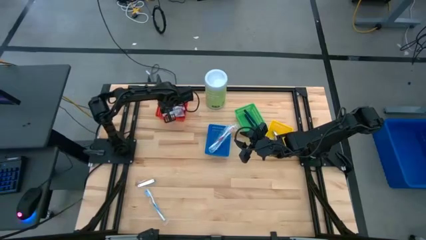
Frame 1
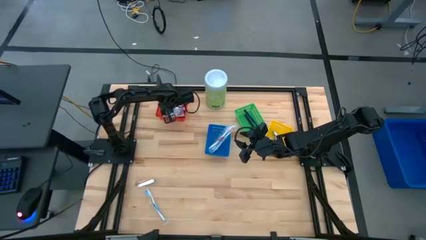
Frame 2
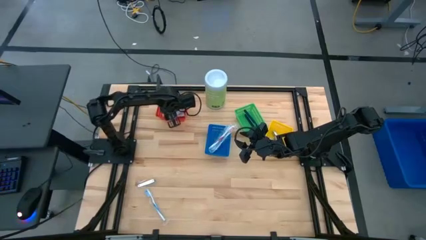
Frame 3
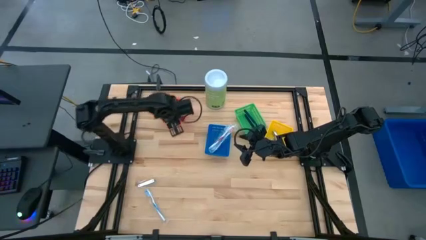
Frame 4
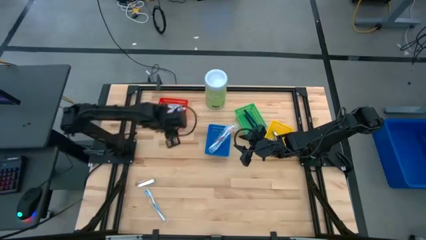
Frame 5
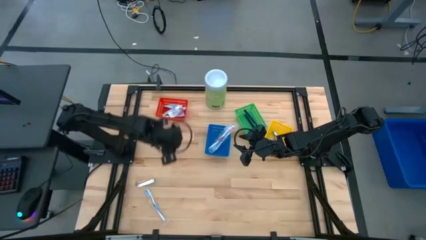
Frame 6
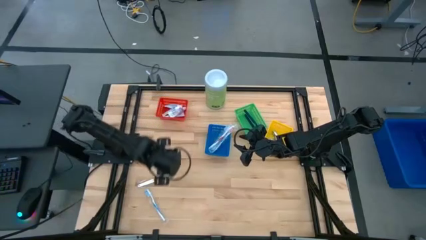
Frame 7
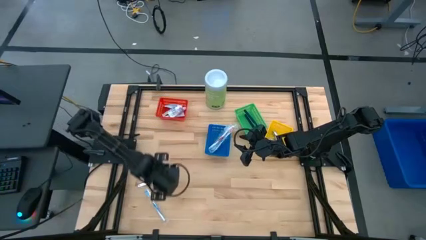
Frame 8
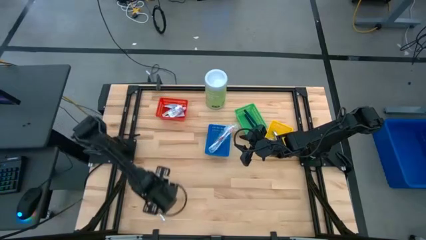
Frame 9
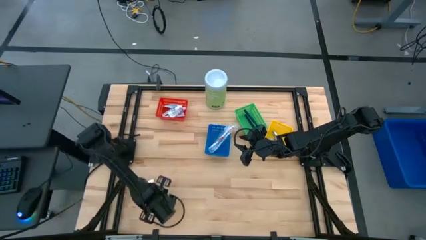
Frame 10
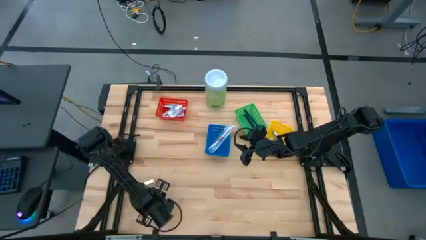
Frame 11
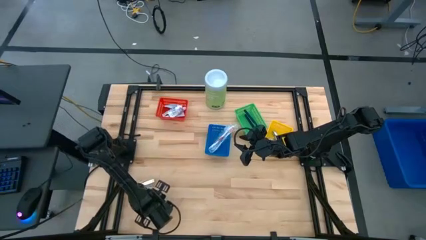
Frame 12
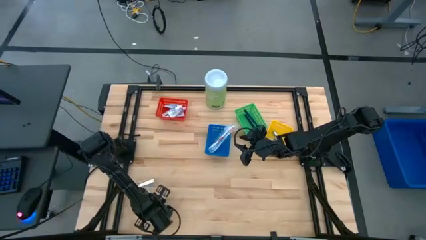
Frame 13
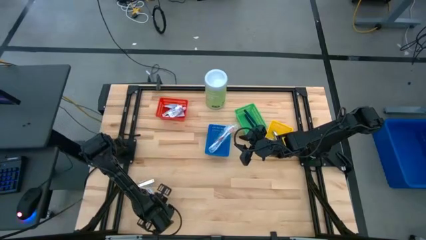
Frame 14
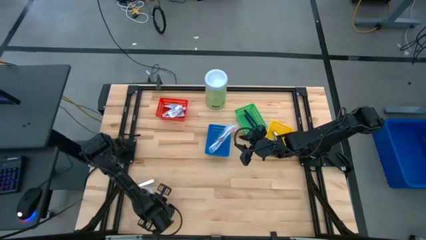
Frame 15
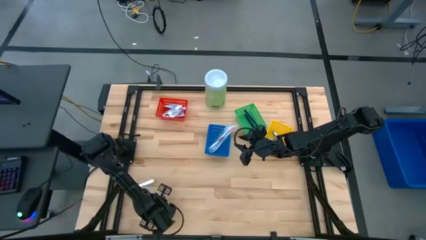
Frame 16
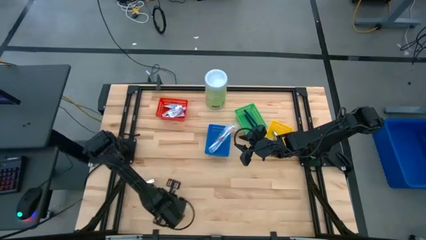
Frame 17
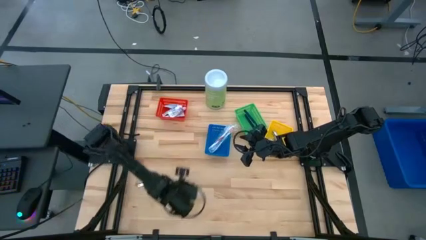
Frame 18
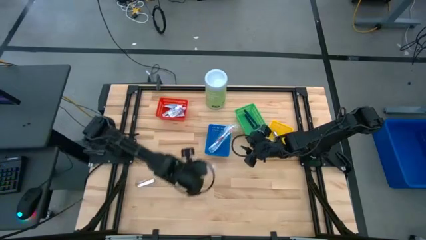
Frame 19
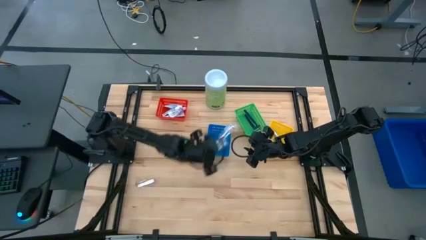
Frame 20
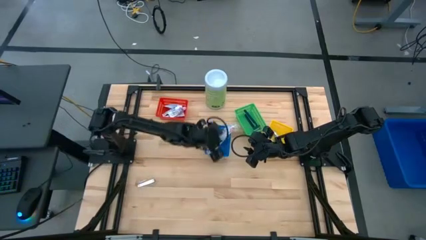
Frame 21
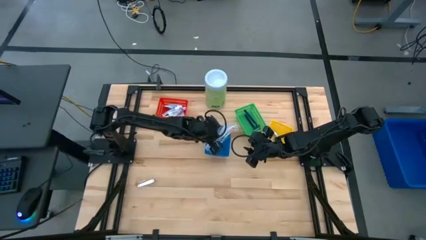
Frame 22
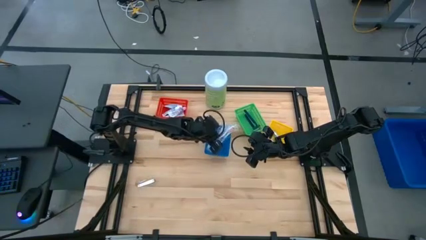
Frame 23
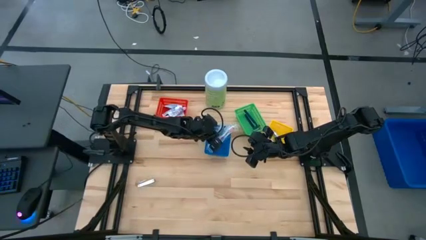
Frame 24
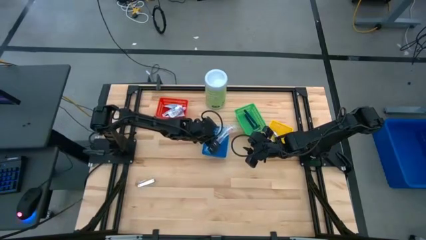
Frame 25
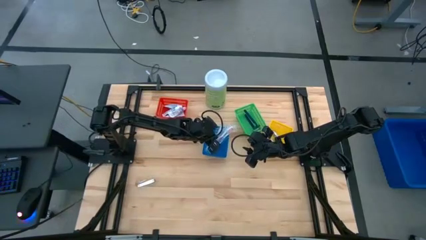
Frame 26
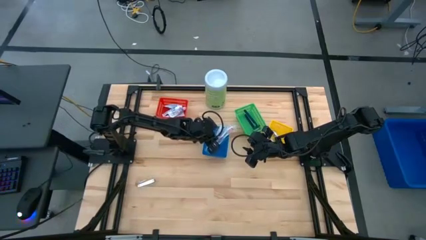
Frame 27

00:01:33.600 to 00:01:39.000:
Task: Pick & Place Travel size toiletries
Put the blue toothbrush into the blue bin

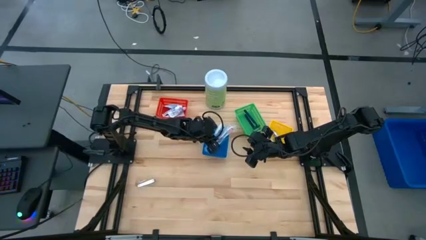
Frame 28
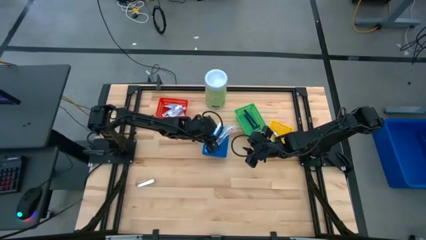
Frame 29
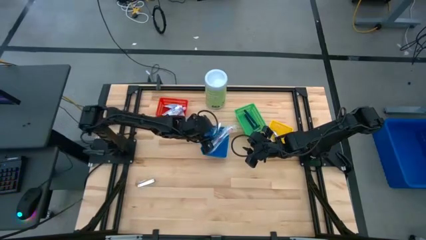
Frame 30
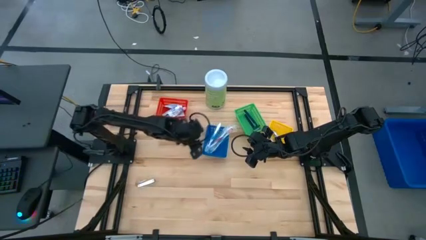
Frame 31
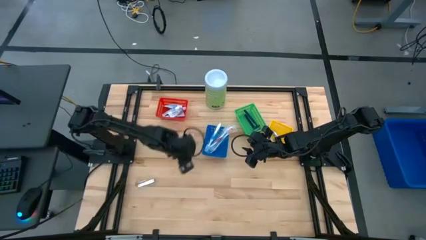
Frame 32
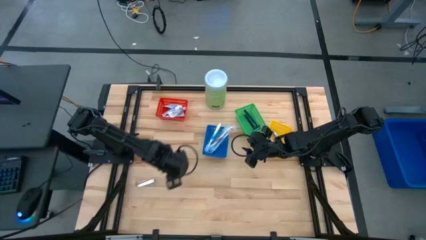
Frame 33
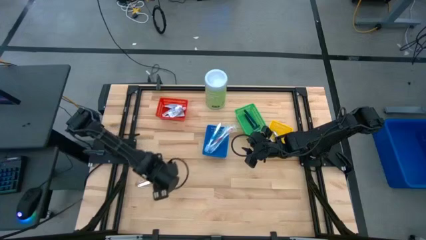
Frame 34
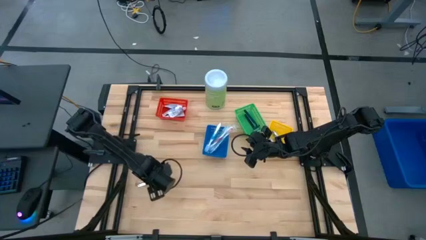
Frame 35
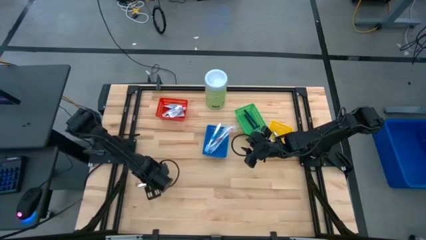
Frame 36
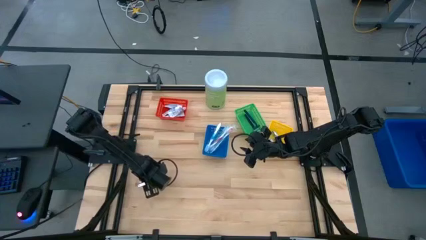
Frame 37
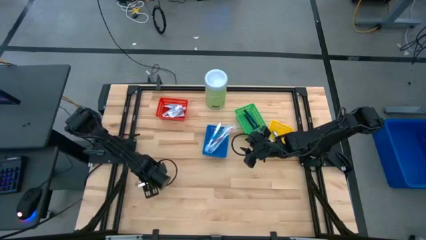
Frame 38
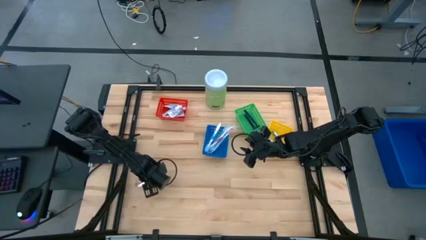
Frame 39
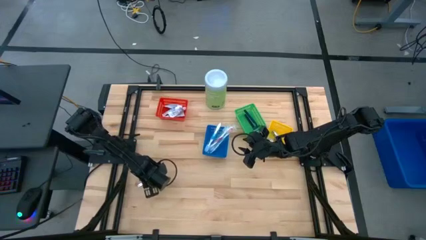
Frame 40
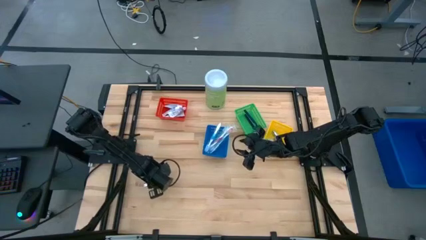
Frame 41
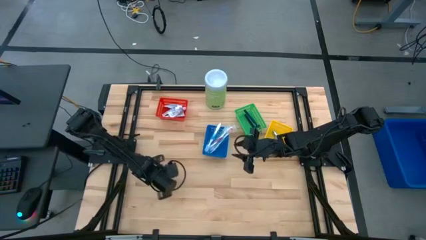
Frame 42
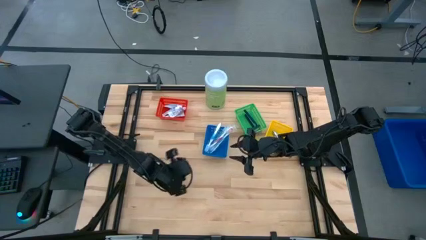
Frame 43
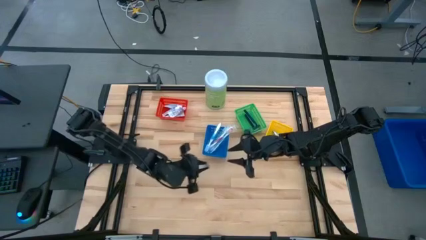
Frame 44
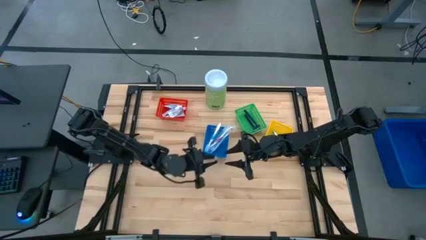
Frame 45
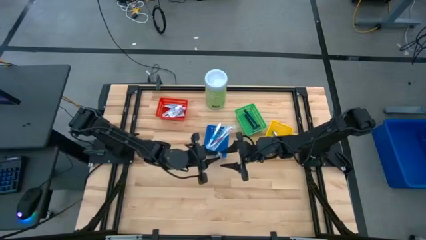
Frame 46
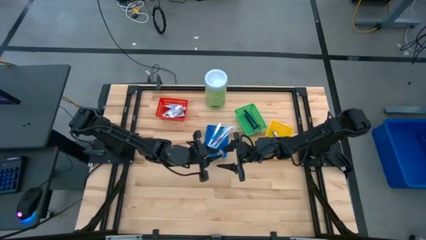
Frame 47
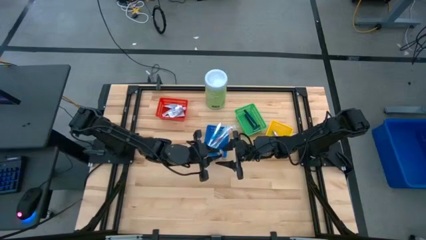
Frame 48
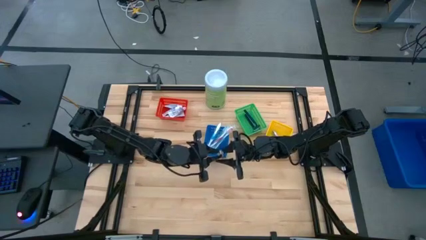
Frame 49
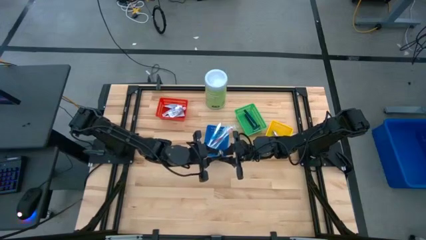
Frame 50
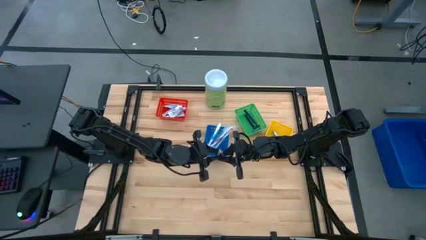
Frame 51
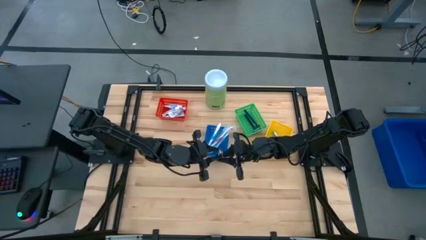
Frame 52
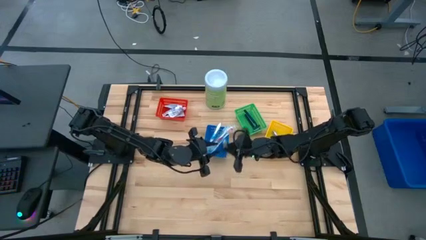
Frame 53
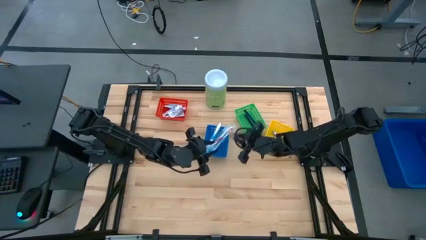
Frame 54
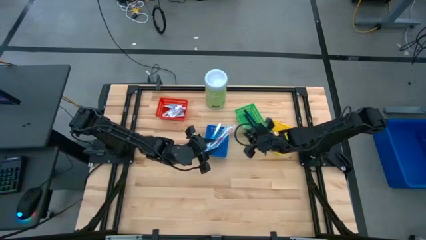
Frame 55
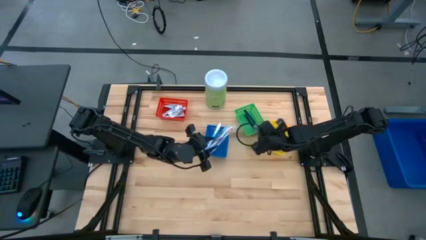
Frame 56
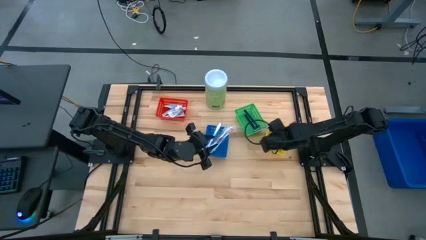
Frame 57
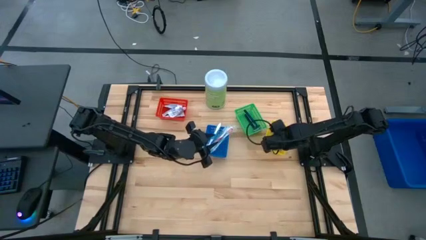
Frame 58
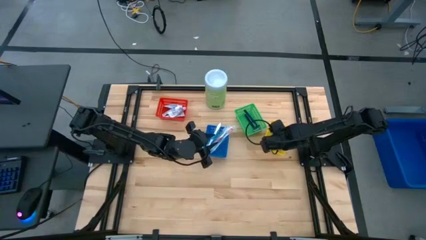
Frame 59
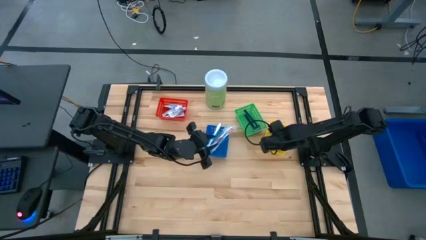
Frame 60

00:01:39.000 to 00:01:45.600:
Put the silver nail cutter into the yellow bin

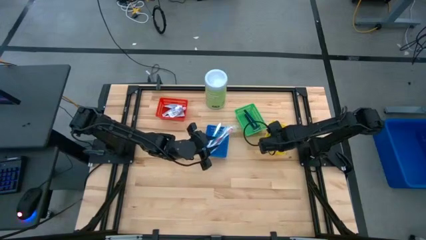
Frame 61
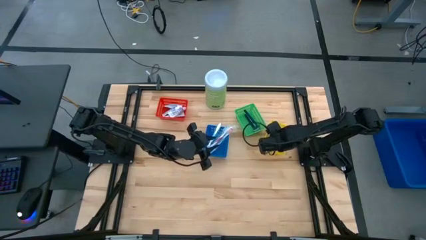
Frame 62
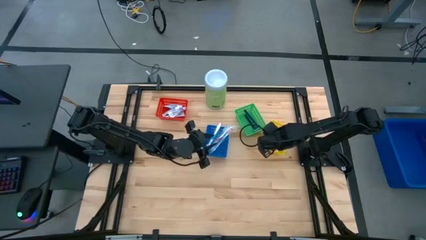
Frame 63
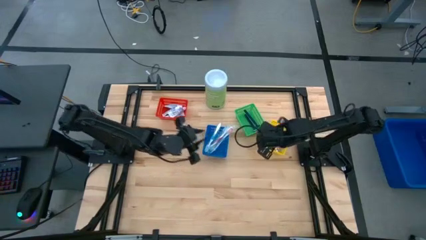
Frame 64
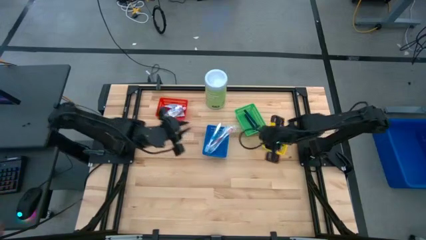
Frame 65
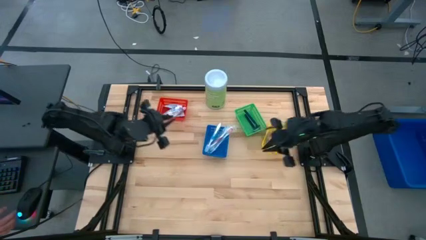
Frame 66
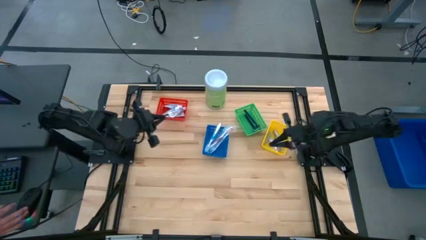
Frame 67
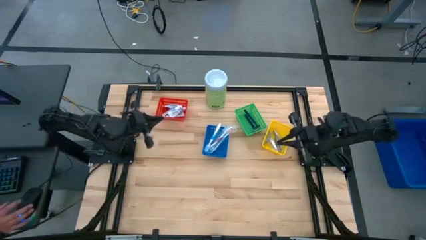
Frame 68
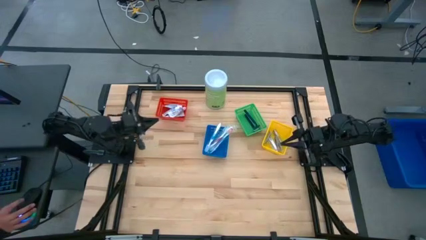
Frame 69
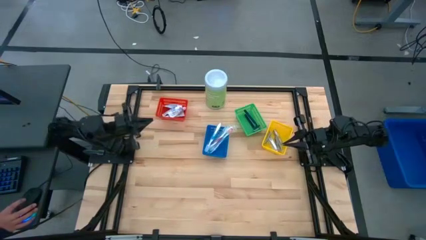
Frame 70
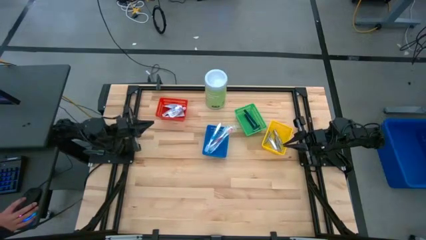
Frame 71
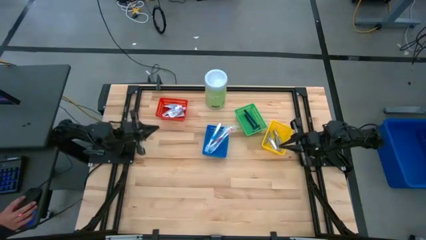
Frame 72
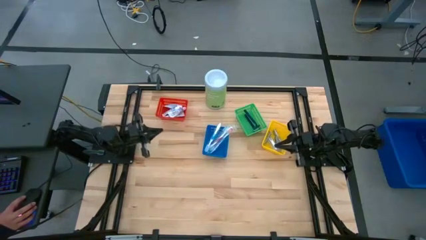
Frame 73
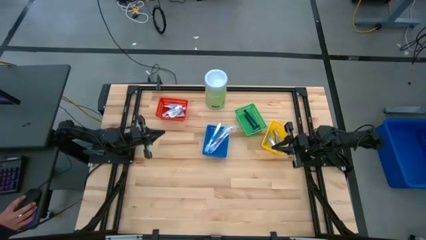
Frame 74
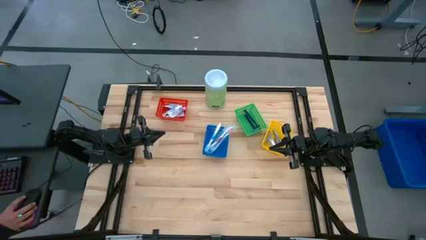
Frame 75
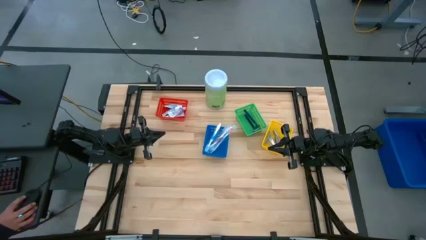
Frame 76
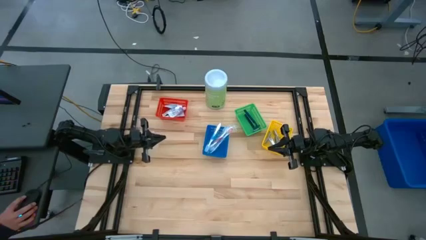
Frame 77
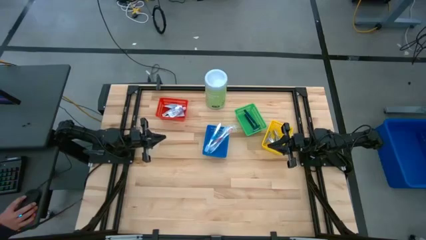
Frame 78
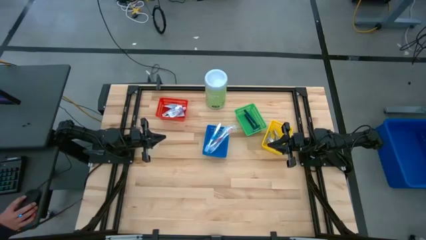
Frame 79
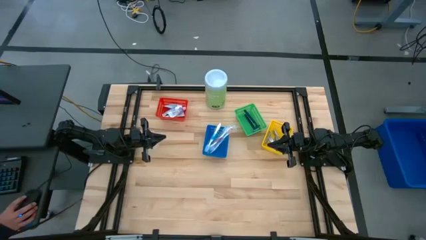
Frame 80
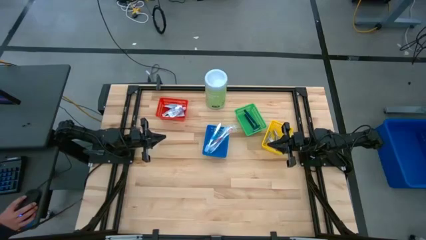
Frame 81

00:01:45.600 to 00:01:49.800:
Return to Home Position
